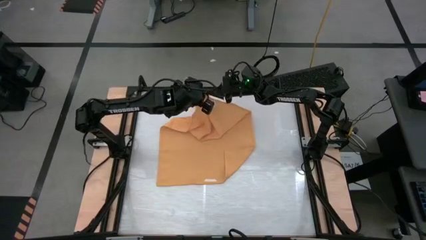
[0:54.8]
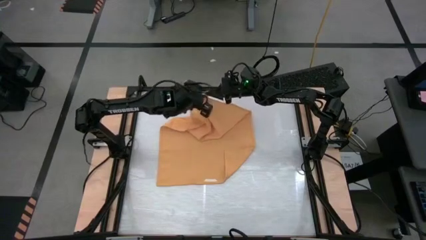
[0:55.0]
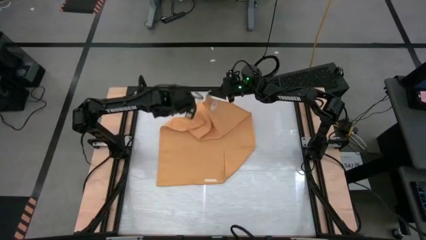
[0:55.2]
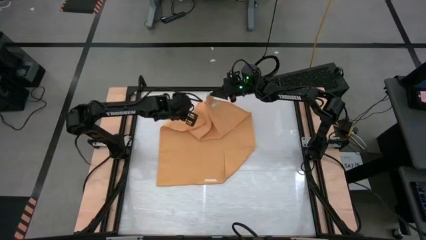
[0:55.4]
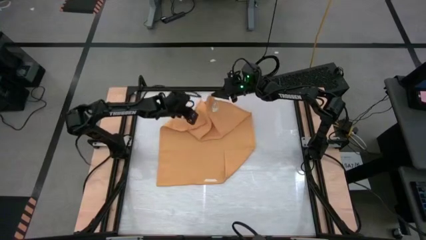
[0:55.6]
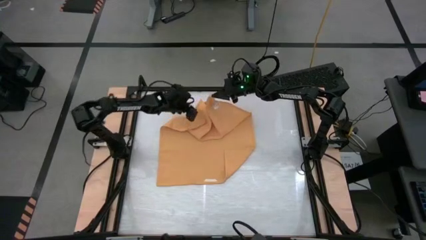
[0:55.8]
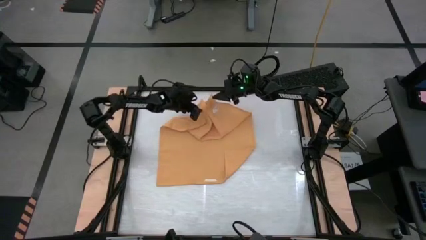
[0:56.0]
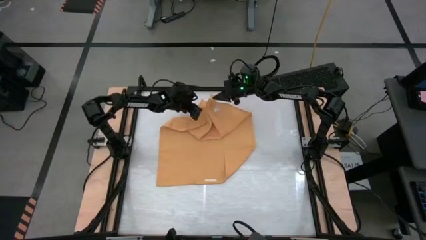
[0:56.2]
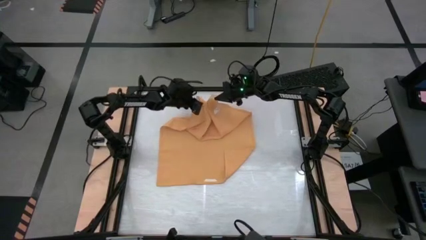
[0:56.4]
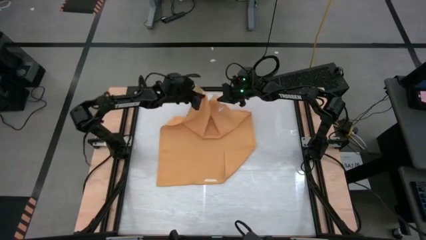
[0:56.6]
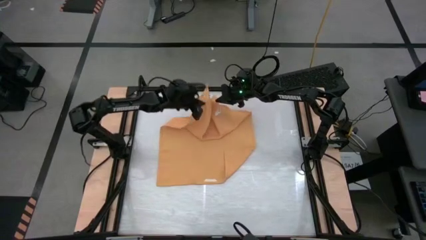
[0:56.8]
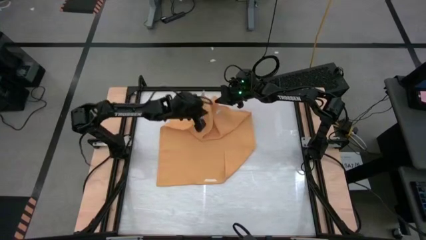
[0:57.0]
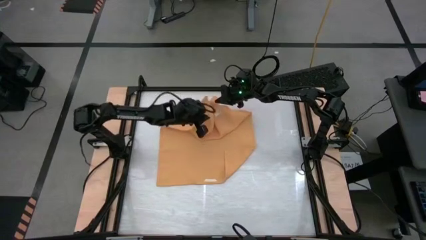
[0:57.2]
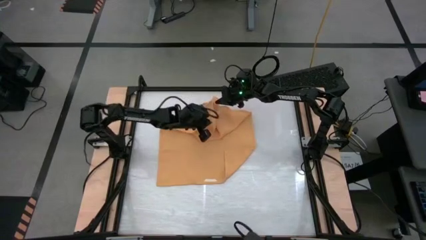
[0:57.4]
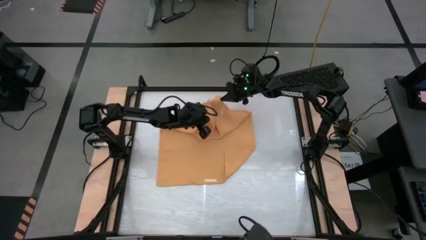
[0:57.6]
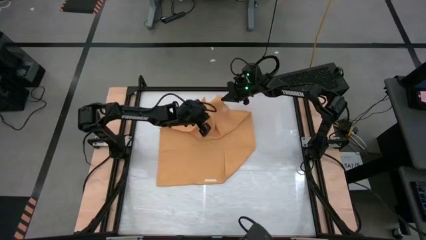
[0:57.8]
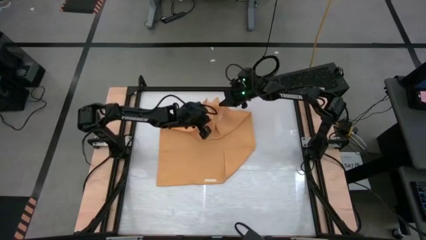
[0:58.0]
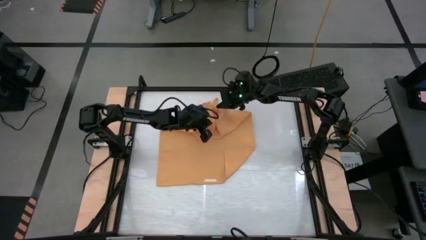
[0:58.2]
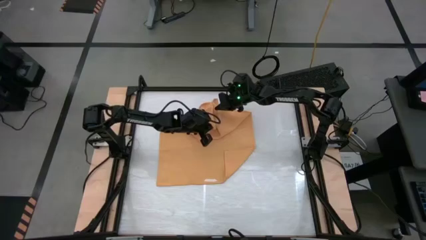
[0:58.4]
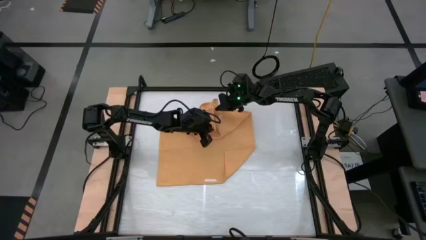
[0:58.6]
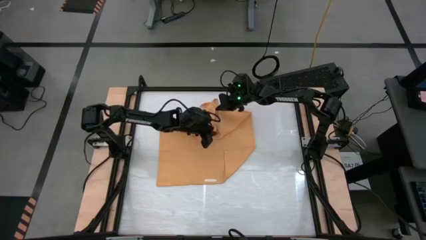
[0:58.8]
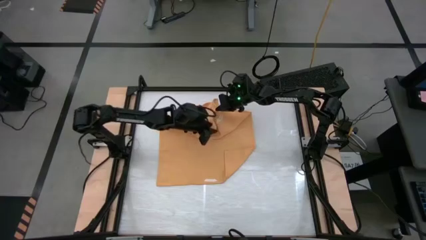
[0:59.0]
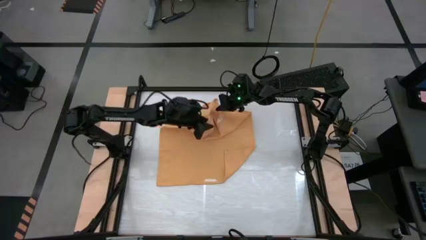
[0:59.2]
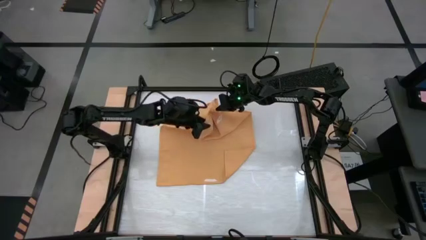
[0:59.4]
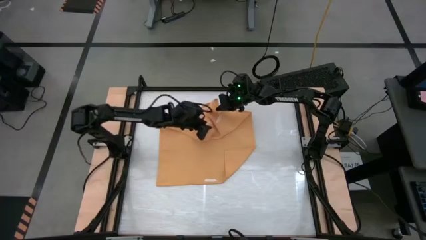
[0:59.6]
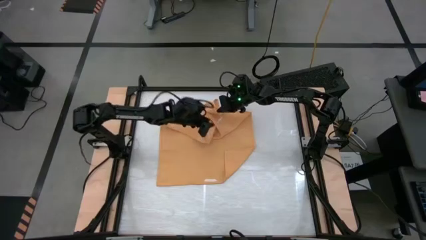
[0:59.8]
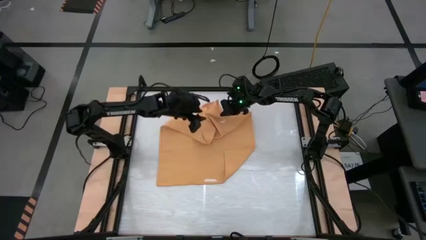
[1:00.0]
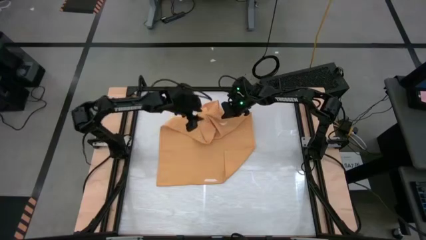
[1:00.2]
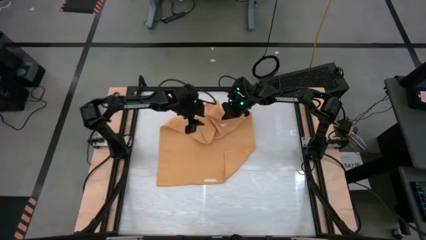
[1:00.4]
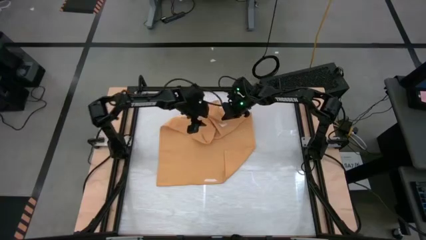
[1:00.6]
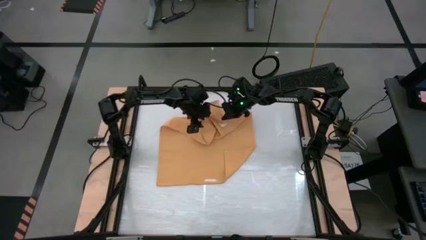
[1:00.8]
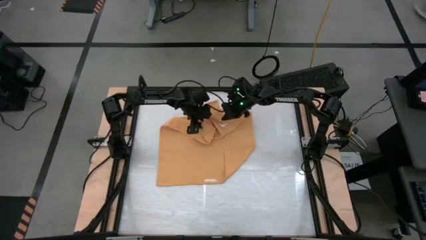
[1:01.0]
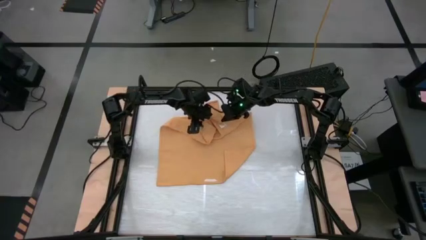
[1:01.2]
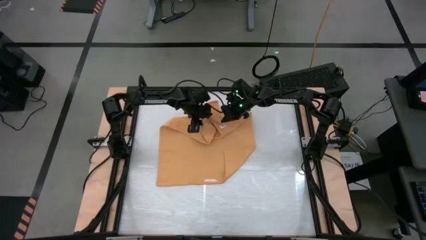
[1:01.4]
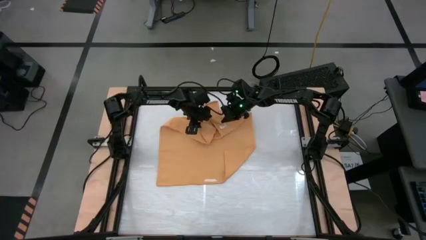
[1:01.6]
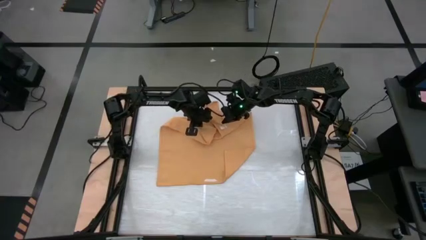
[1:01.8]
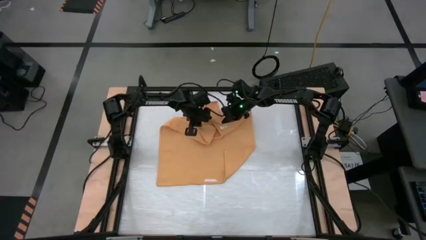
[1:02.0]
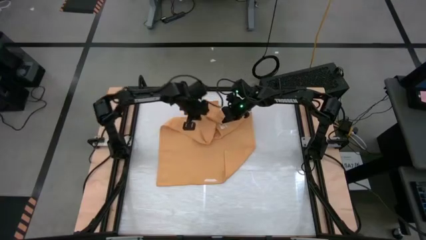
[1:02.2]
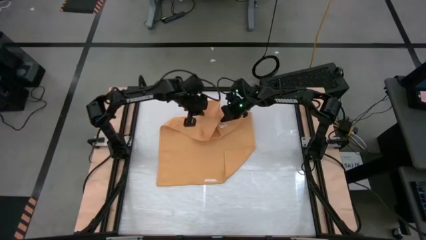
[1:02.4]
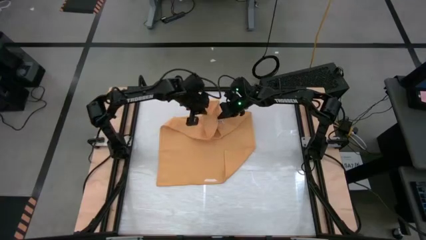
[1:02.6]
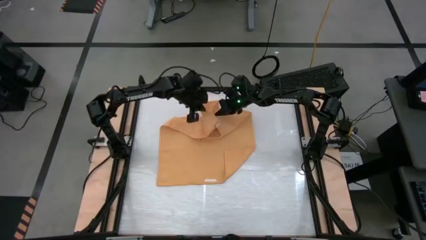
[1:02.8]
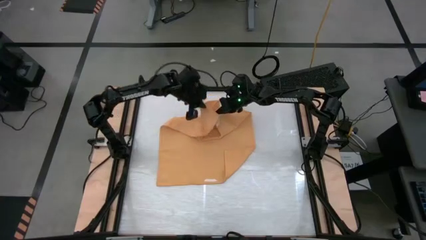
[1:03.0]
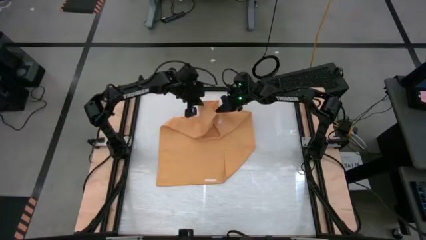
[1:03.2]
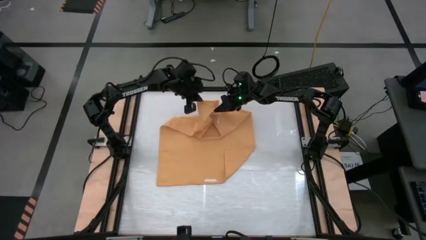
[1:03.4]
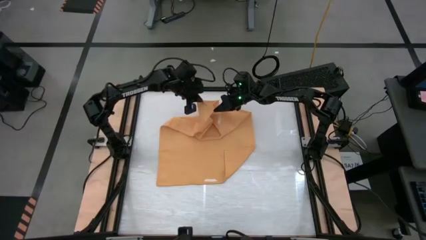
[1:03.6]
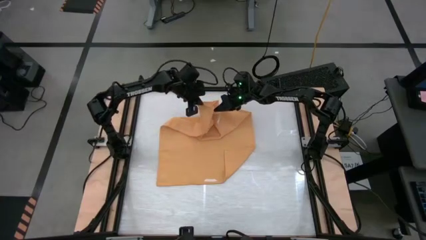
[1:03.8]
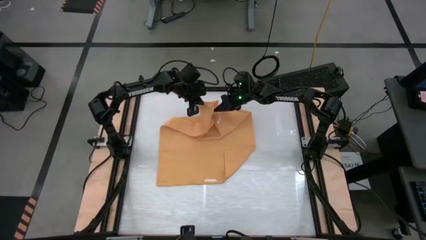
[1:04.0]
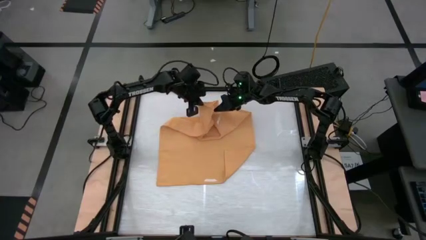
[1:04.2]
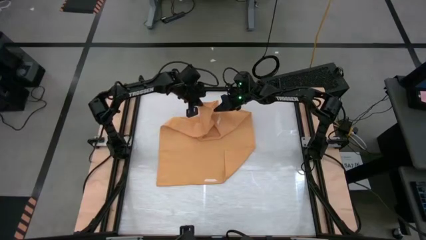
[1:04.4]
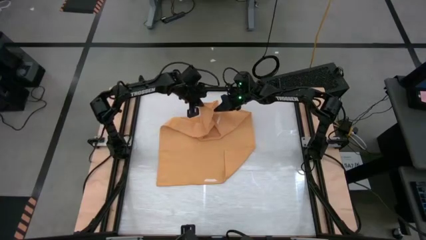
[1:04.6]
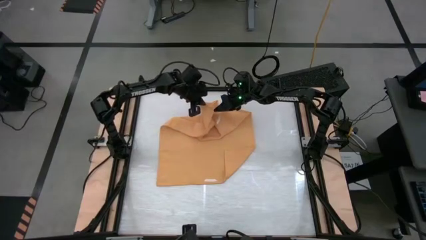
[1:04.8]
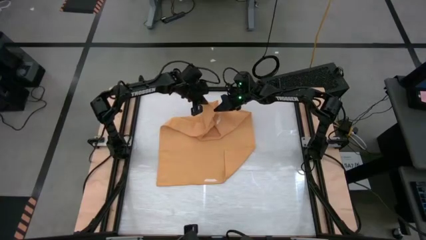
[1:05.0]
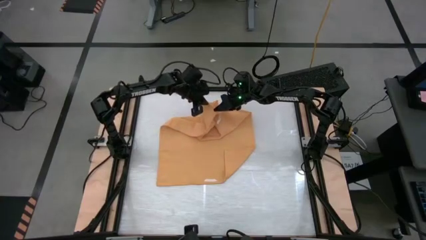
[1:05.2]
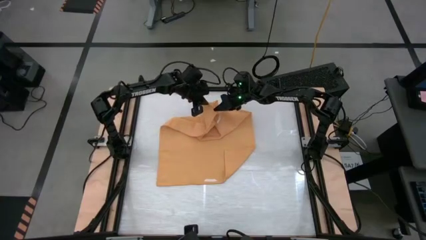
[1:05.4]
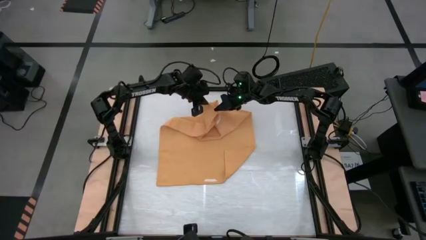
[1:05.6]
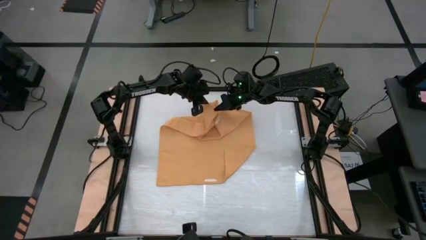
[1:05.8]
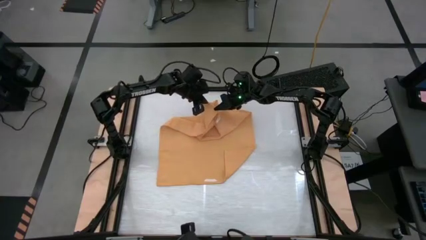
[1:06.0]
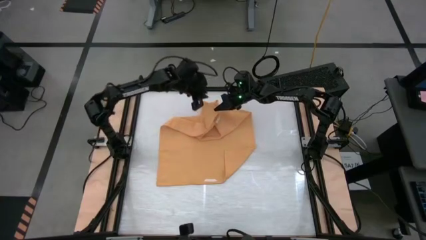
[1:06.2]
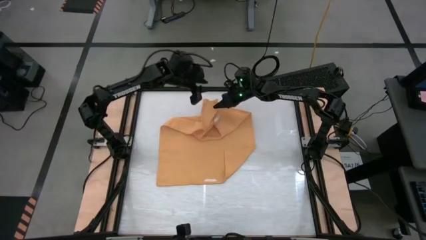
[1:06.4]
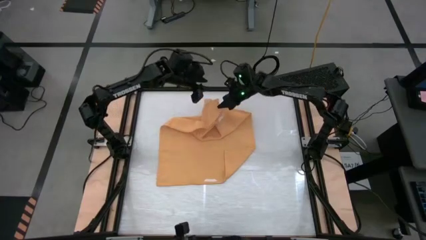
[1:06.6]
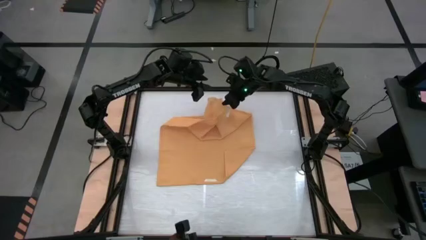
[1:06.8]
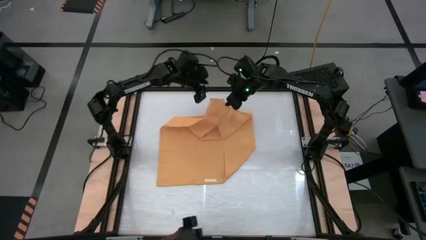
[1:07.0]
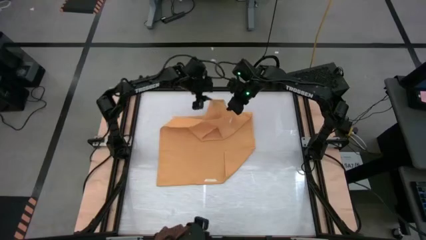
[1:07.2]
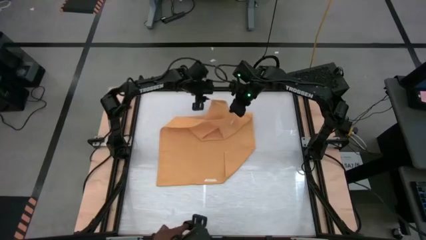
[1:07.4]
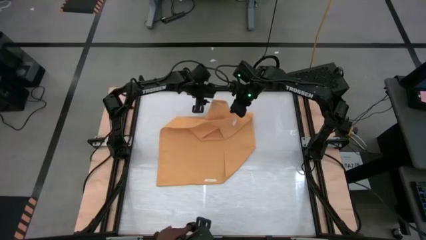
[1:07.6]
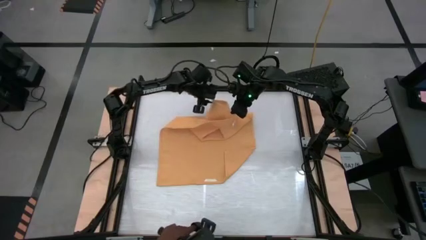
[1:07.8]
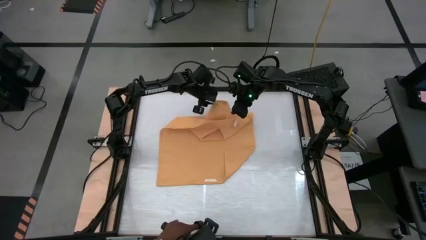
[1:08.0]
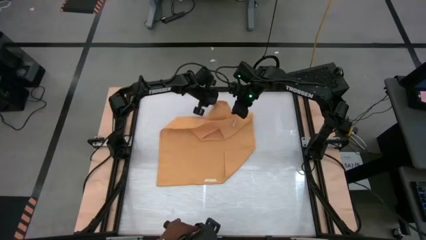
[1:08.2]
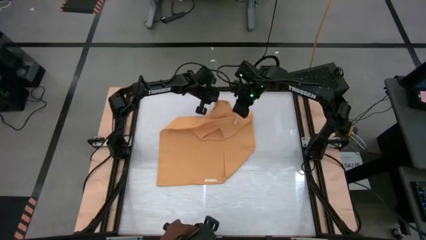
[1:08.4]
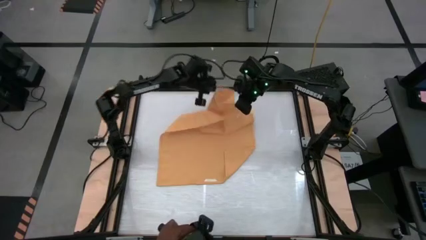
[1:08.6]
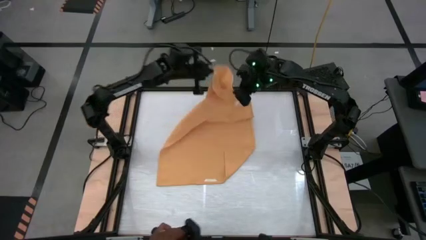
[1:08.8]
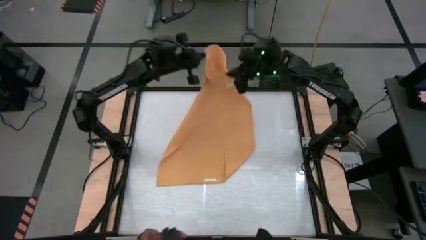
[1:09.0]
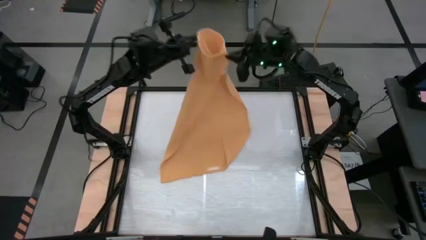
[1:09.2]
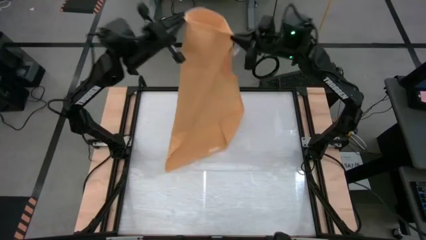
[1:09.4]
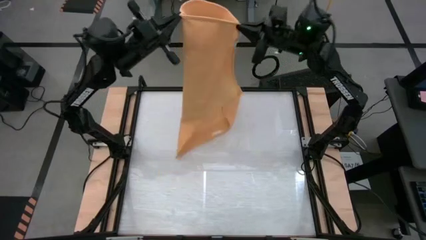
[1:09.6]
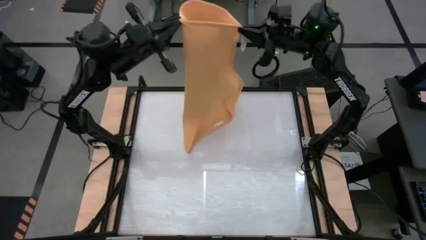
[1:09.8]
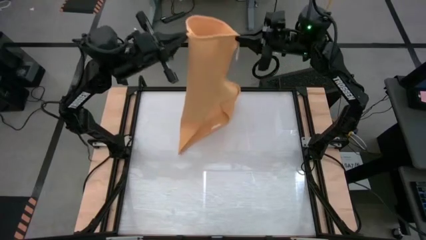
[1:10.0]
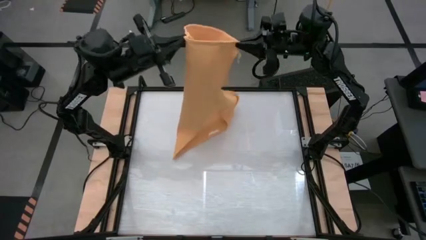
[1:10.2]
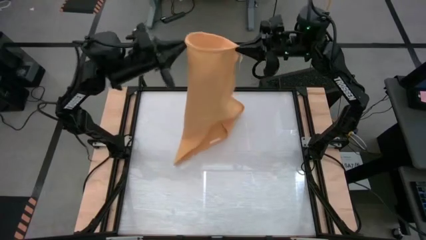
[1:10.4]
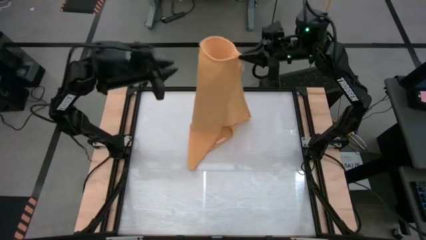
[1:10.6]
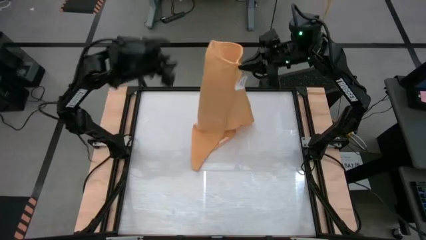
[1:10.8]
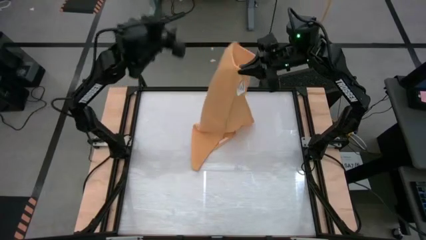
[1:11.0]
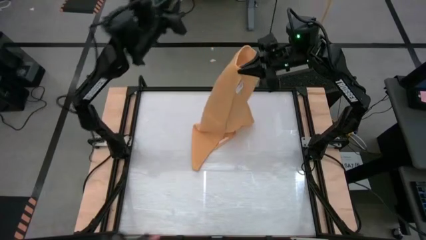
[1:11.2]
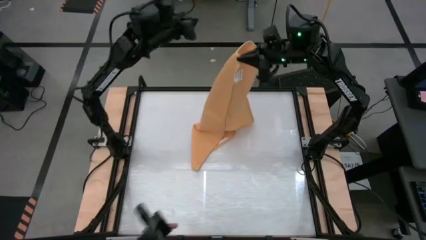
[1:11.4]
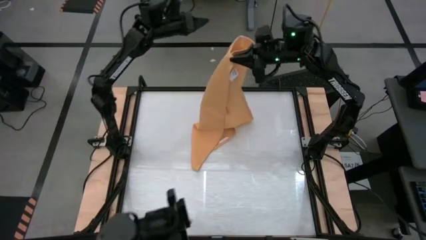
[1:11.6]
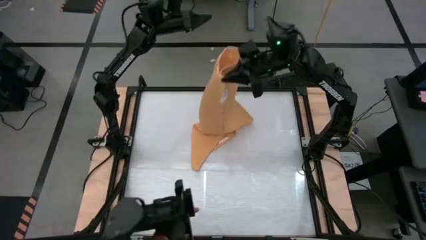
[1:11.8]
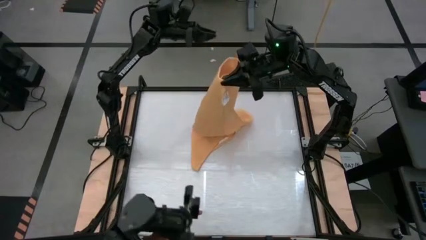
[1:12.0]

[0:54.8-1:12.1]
Task: Roll towel into tight, uniform cylinder
Roll the yellow towel
